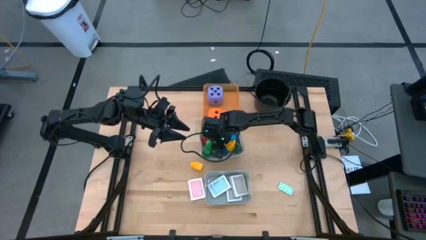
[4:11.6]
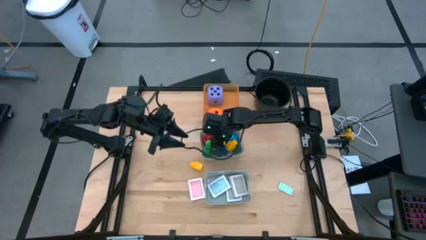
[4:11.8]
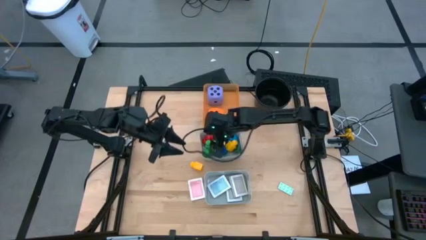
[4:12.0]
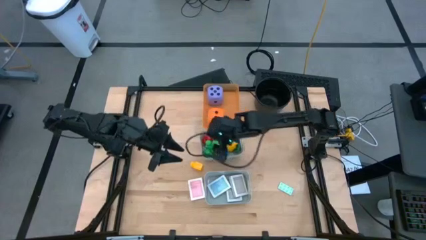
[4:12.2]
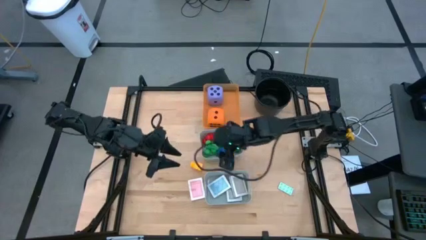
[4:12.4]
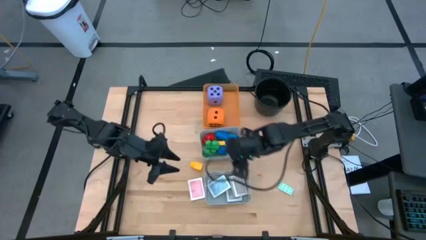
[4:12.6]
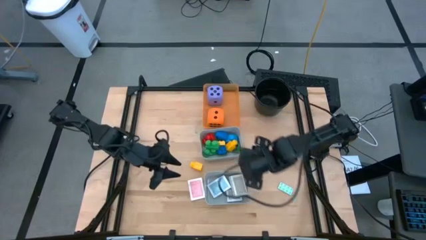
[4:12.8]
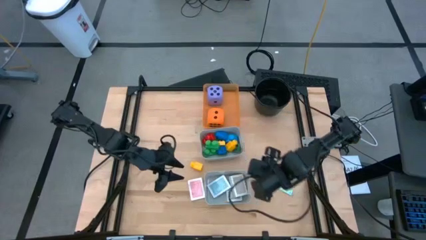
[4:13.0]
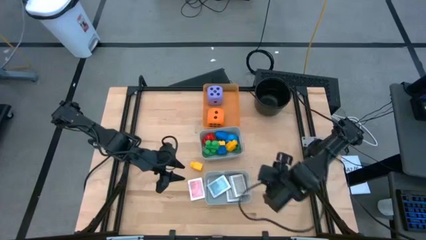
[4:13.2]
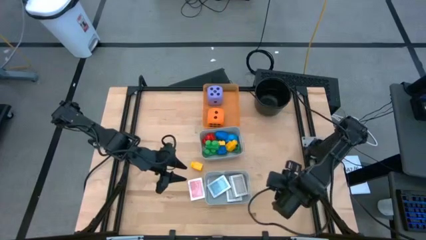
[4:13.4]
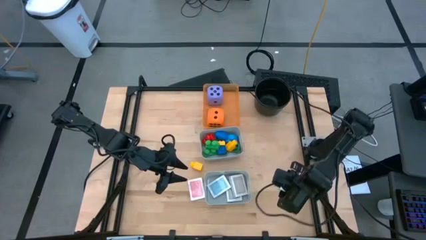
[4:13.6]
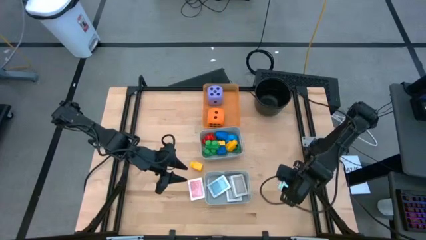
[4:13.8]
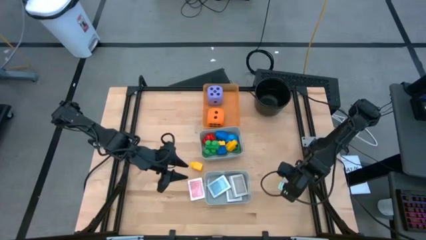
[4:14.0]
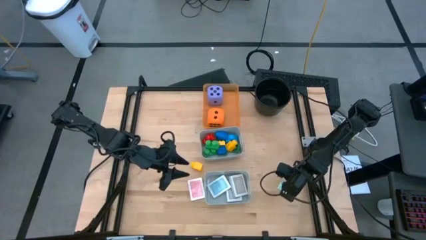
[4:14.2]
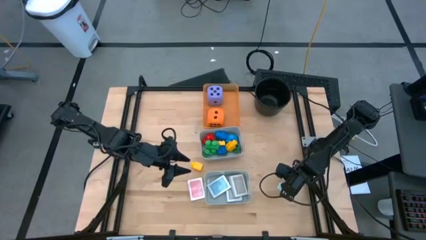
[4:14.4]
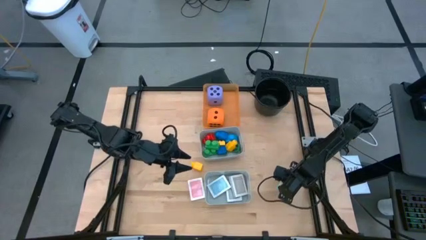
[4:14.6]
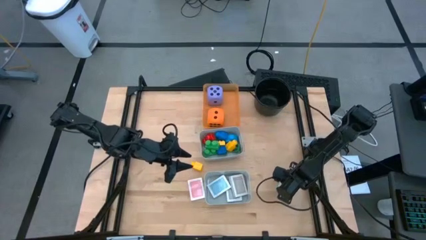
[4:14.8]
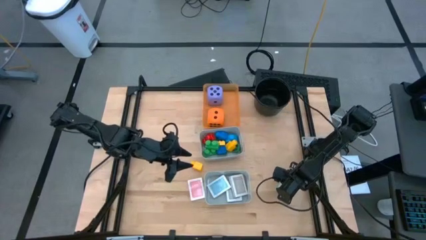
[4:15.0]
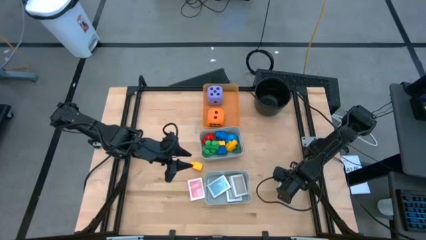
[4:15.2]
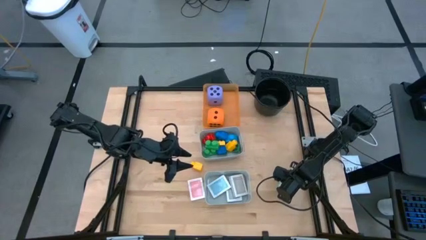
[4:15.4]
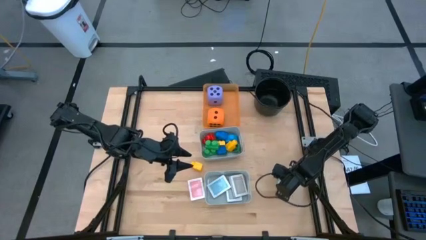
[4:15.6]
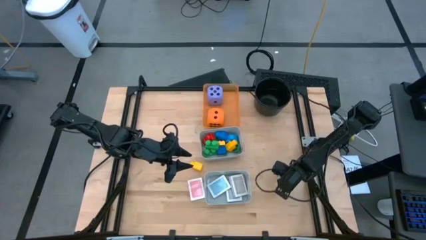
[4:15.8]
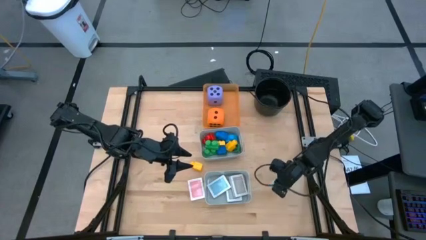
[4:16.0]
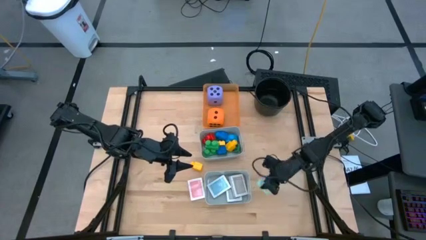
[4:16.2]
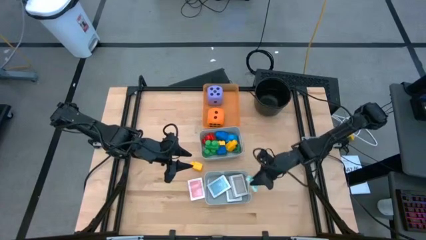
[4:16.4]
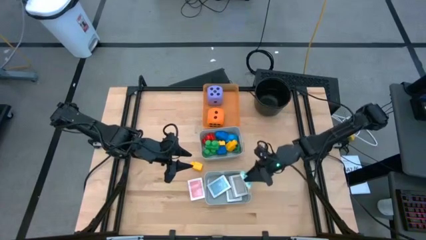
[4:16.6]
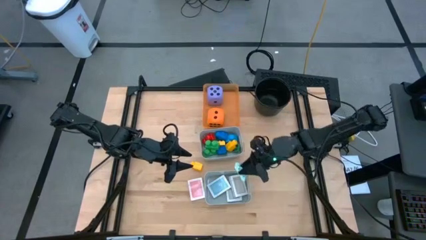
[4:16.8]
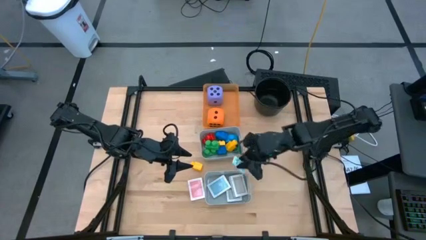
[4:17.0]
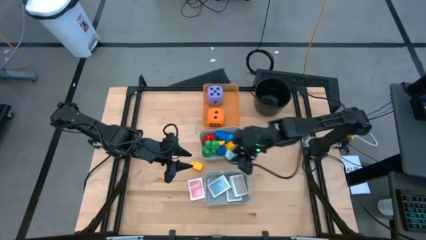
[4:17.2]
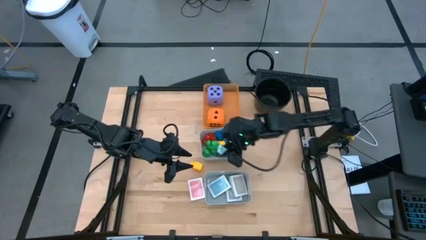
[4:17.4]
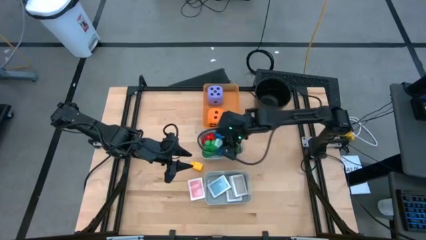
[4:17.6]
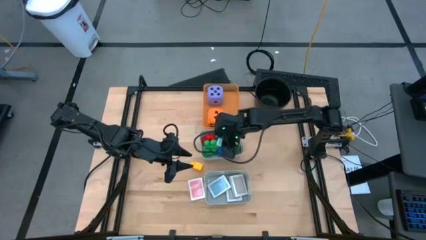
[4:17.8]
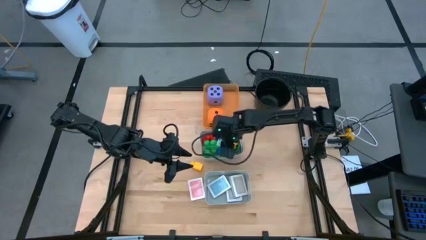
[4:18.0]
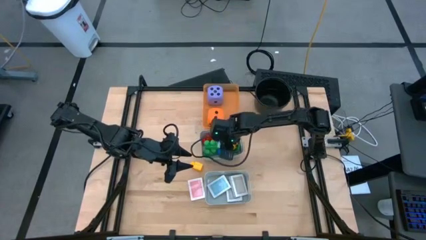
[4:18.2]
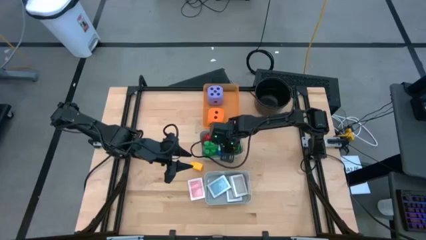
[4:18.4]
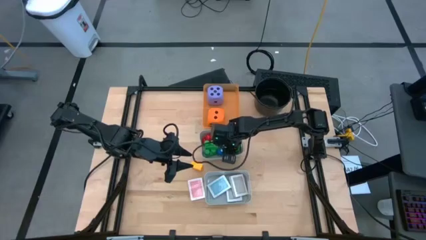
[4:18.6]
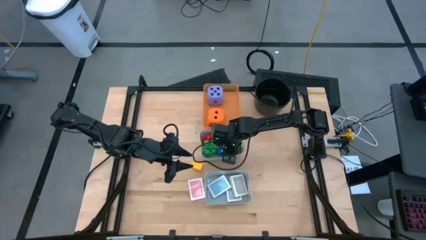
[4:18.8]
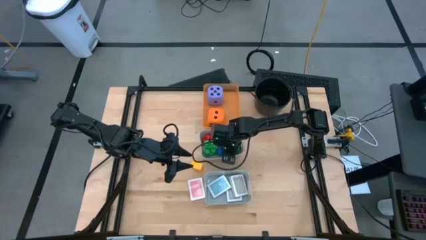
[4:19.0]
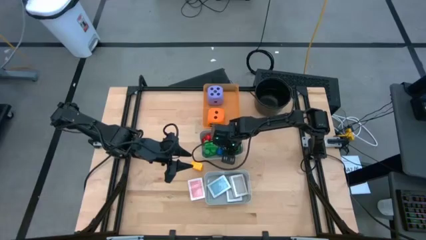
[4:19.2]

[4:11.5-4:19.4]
Task: Pick & Place Toys
Put the pastel light blue-green game piece into the top gray bin

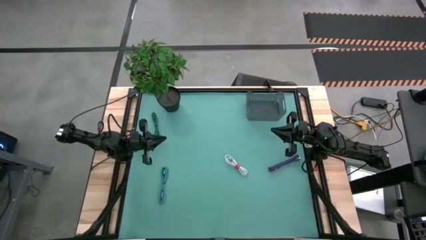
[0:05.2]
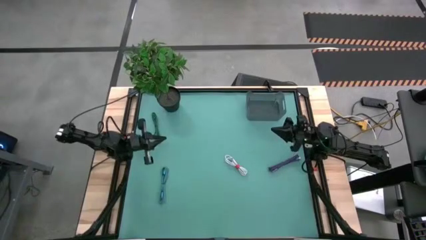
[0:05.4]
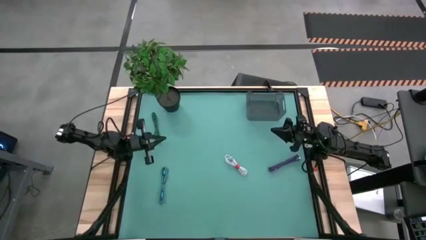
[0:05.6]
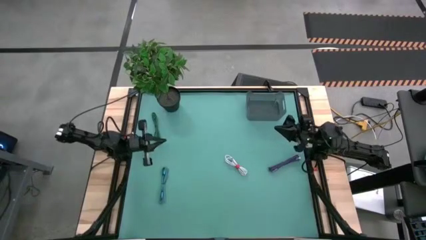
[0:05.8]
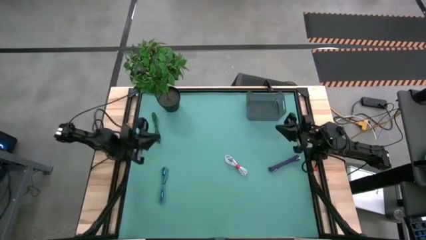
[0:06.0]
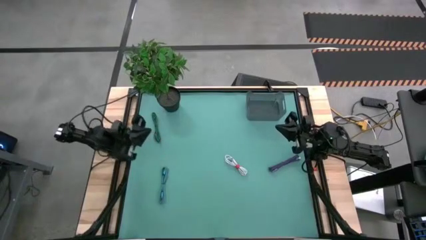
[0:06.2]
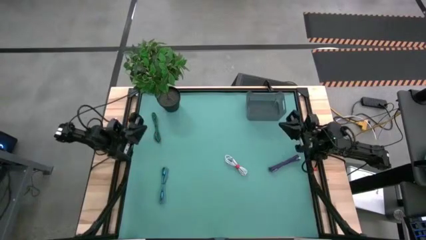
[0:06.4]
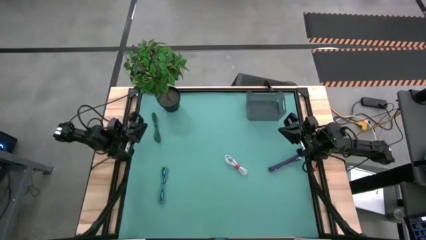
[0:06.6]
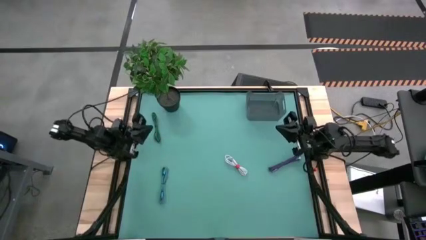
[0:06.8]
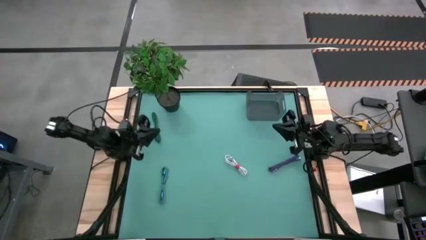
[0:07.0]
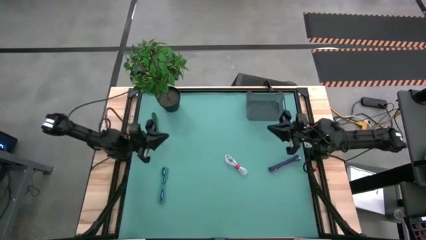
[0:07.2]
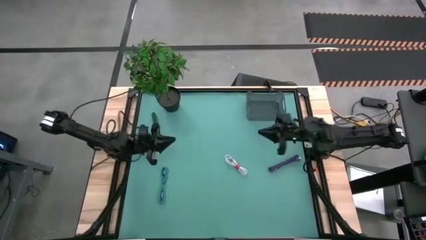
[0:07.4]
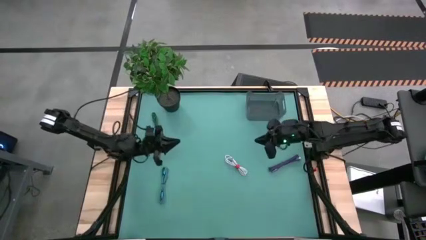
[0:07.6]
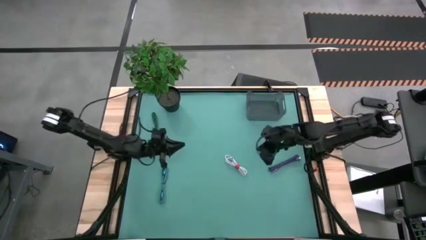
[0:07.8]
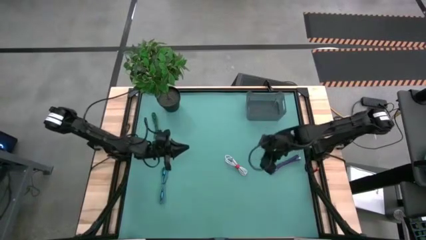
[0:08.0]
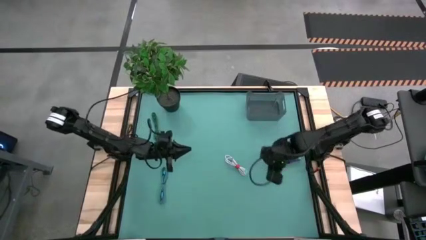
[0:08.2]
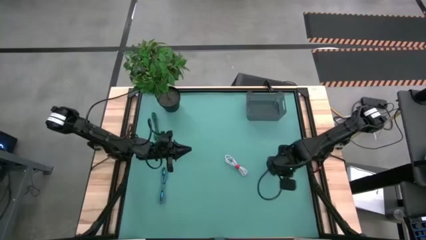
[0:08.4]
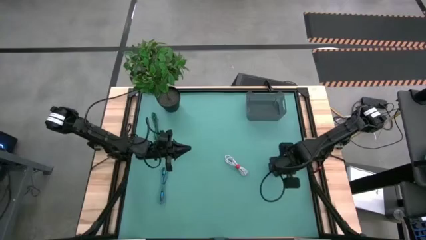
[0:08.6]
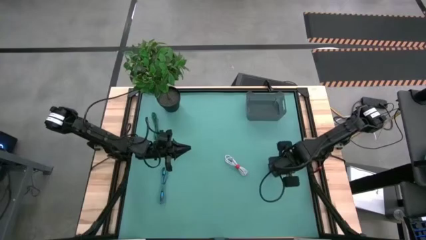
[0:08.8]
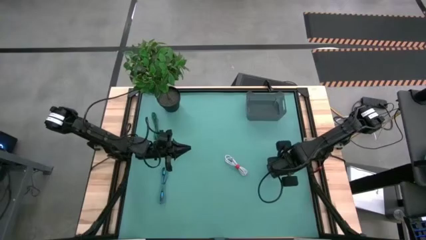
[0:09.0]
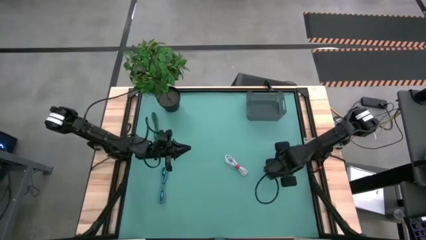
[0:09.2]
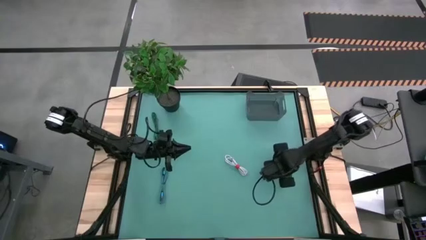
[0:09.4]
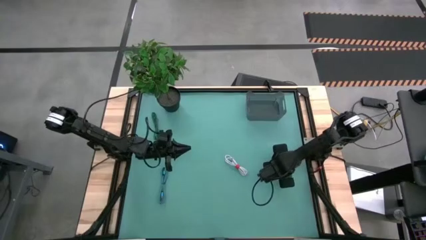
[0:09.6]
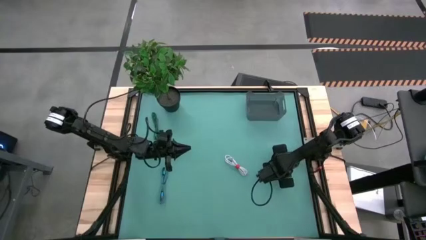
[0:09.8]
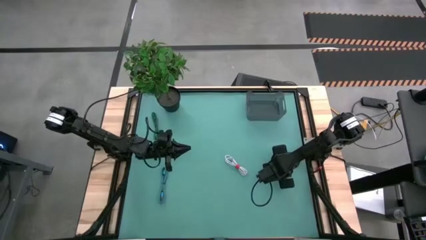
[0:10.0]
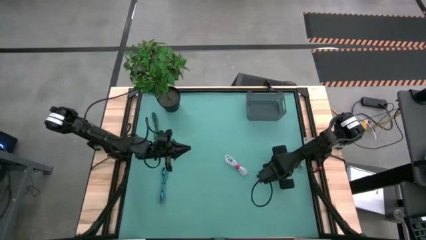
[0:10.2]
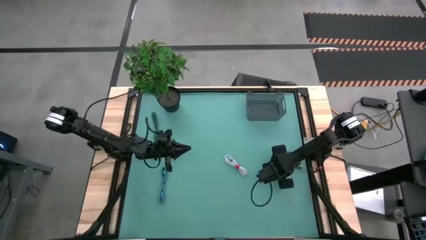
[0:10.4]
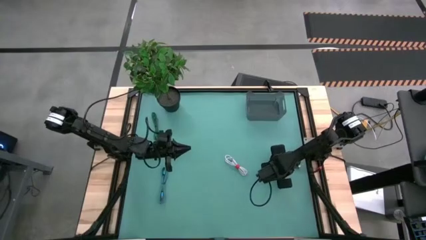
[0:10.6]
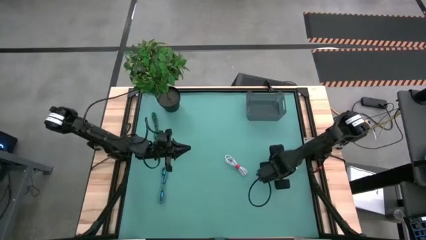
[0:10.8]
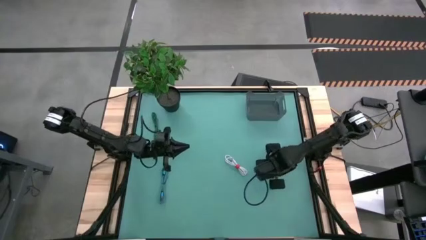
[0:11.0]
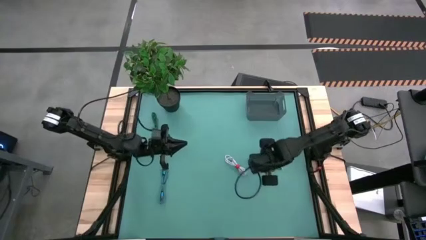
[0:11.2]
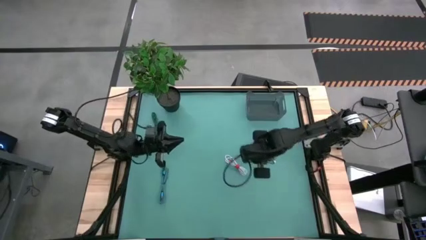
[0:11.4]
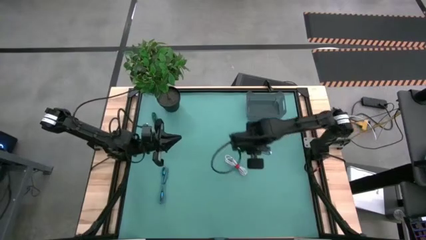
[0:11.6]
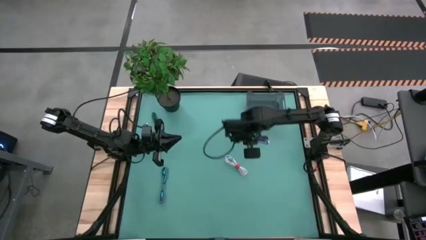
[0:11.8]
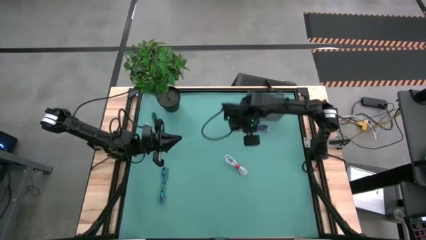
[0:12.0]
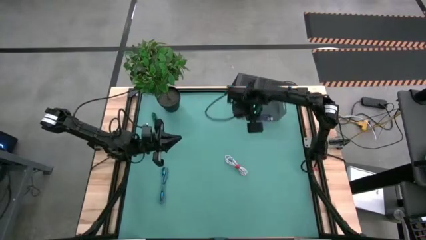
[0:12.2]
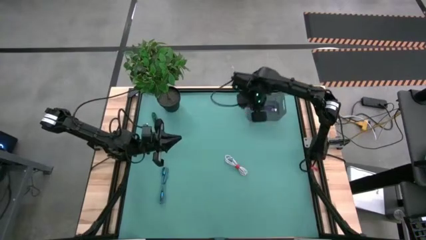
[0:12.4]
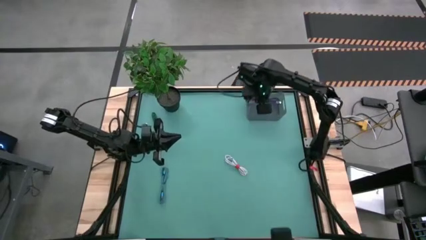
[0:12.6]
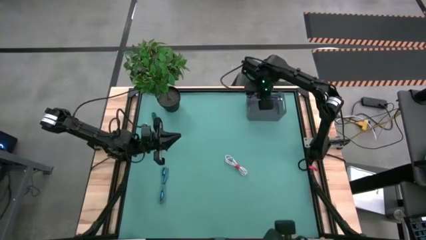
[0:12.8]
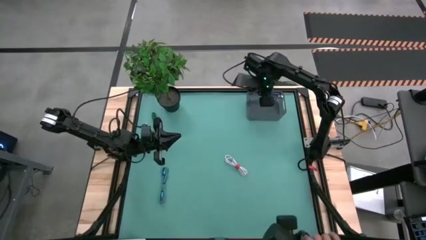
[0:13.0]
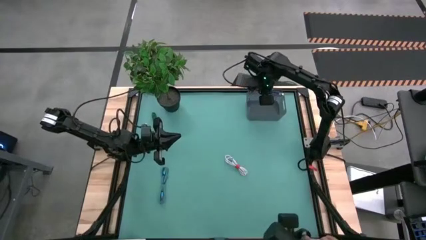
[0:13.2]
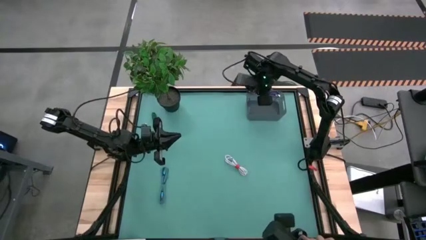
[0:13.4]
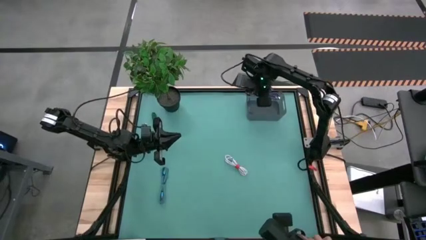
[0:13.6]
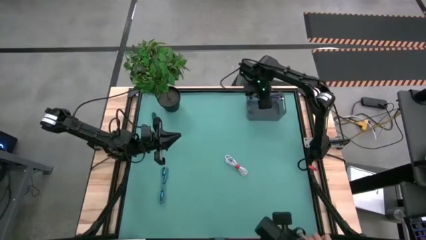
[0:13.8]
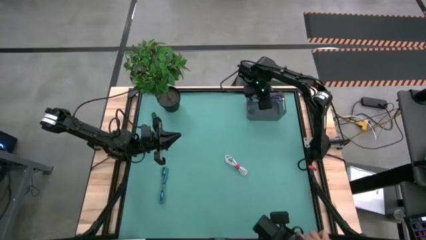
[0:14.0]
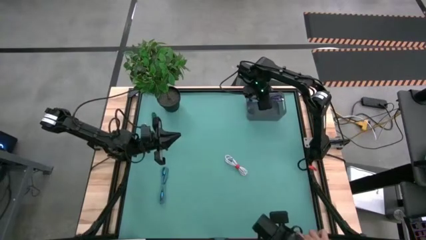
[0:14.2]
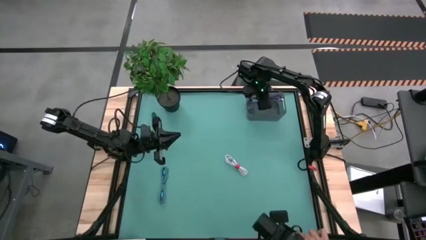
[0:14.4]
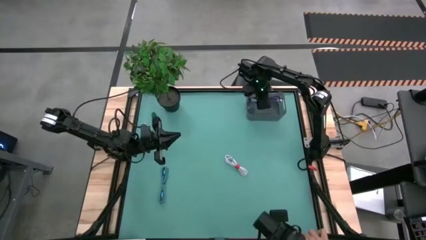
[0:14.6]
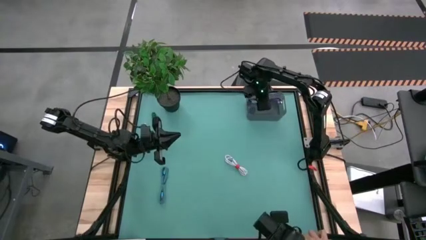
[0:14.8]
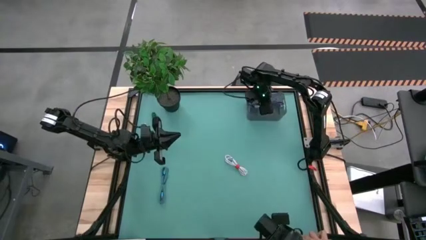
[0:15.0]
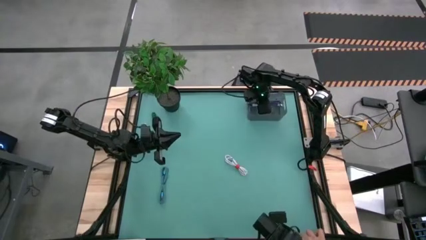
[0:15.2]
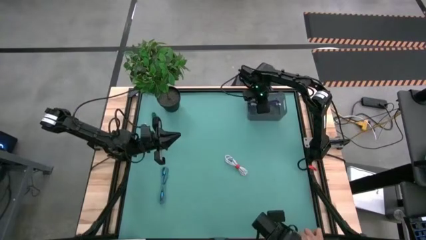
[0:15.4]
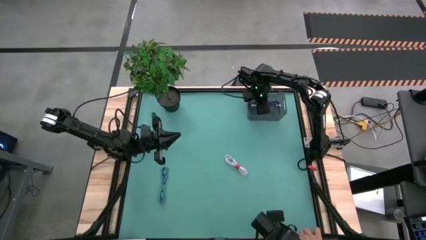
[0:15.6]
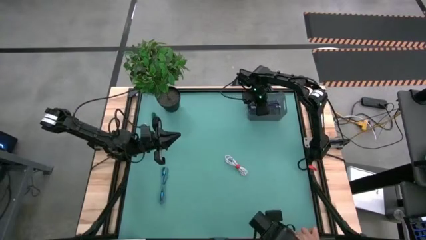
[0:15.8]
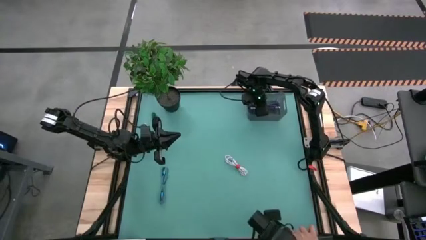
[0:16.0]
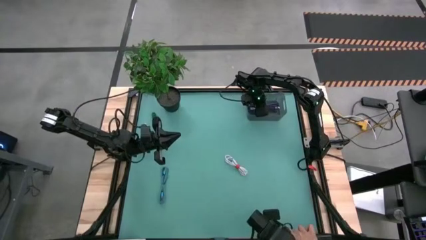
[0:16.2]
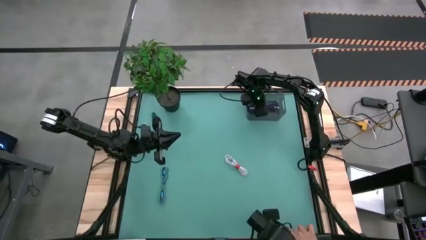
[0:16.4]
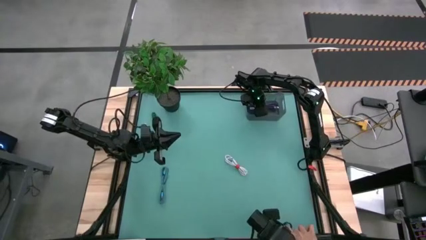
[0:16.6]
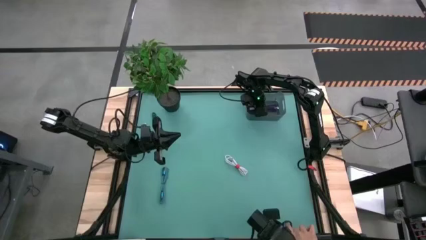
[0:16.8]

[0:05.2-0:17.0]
Task: Pick and place USB-C Cables
Put the purple charger cable into the black bin
